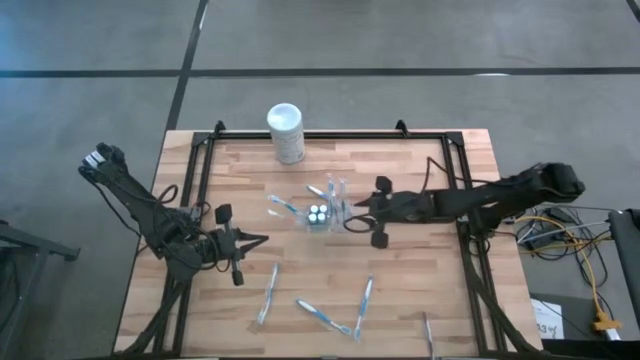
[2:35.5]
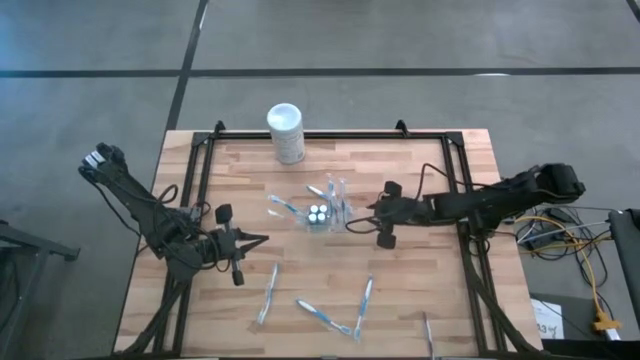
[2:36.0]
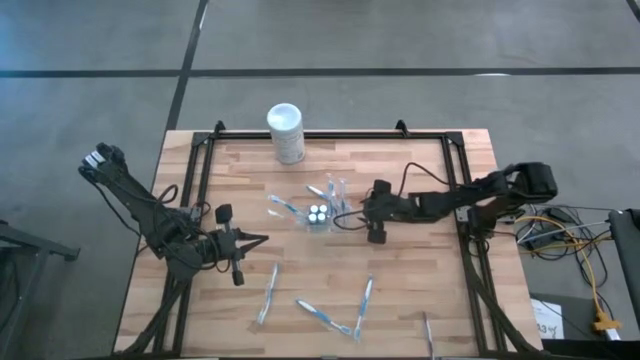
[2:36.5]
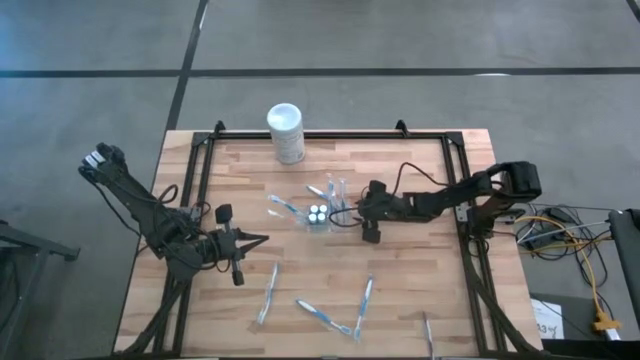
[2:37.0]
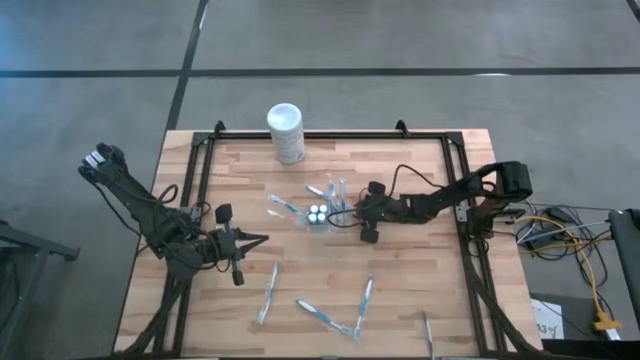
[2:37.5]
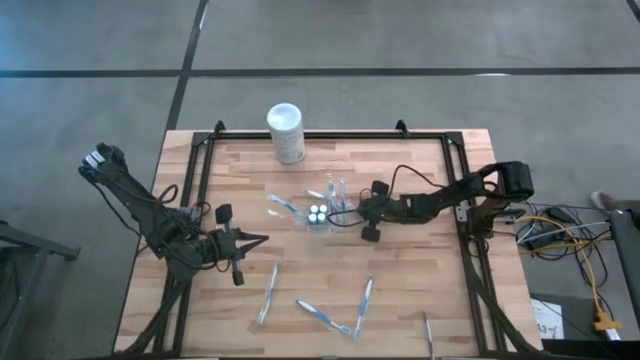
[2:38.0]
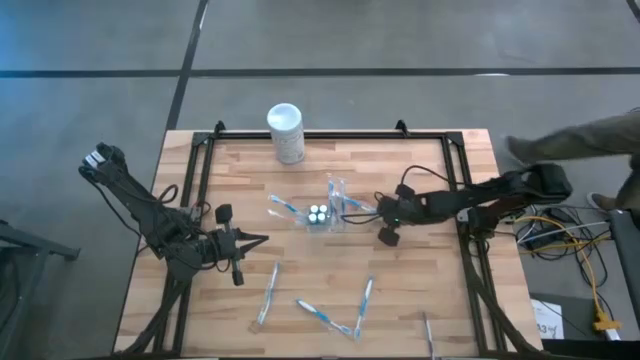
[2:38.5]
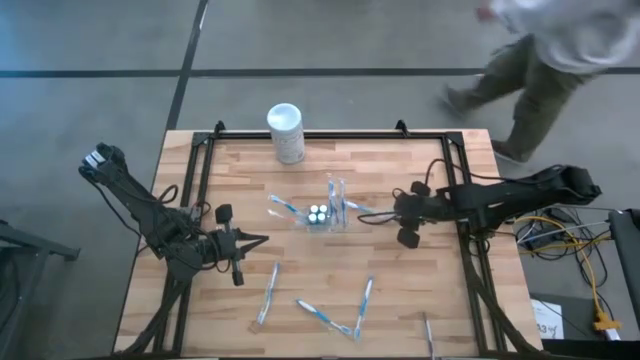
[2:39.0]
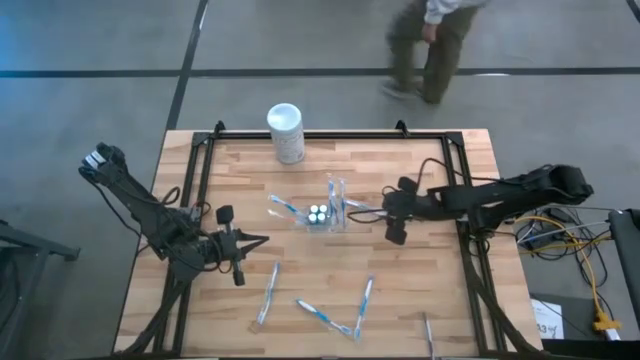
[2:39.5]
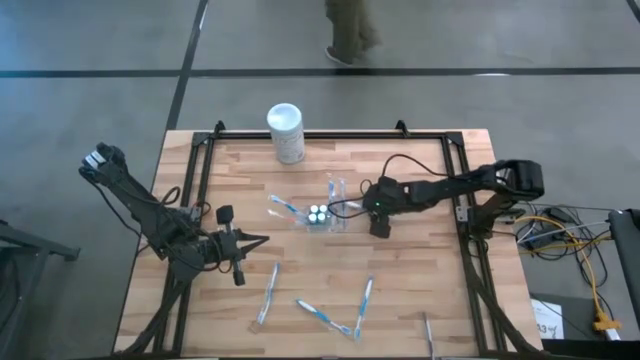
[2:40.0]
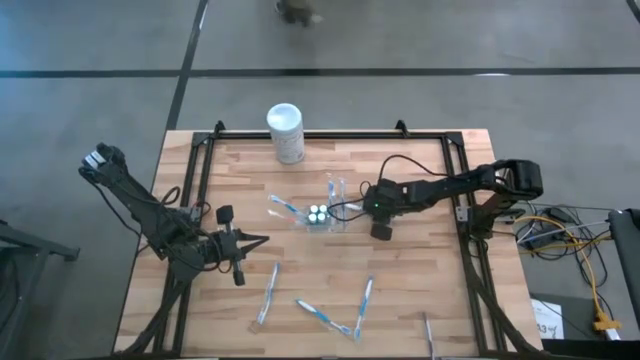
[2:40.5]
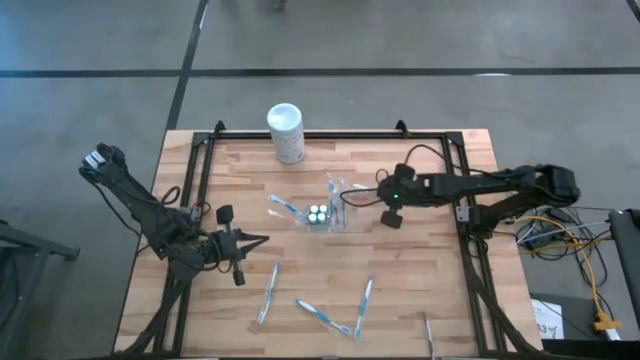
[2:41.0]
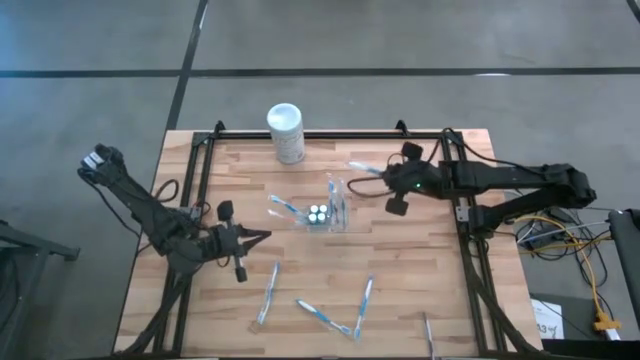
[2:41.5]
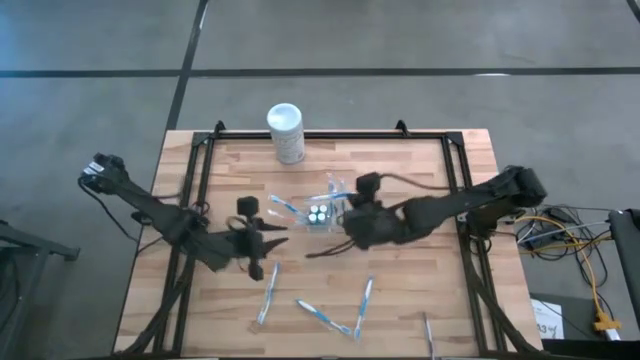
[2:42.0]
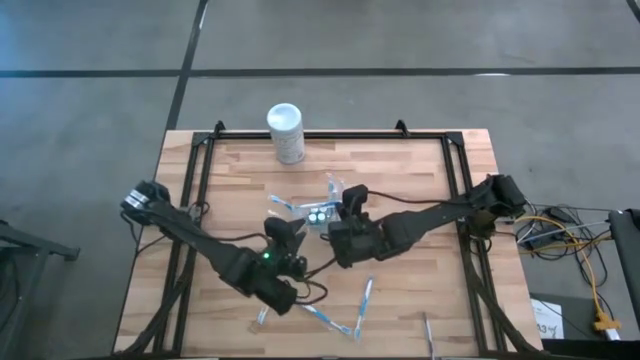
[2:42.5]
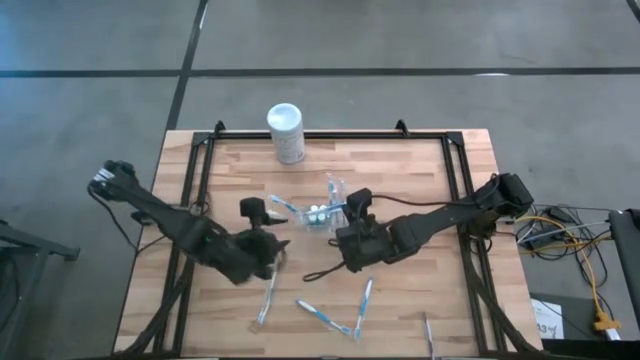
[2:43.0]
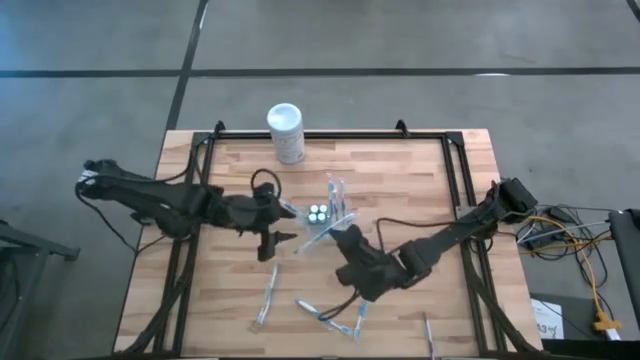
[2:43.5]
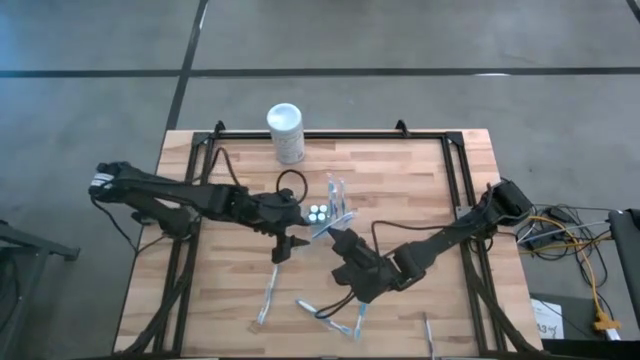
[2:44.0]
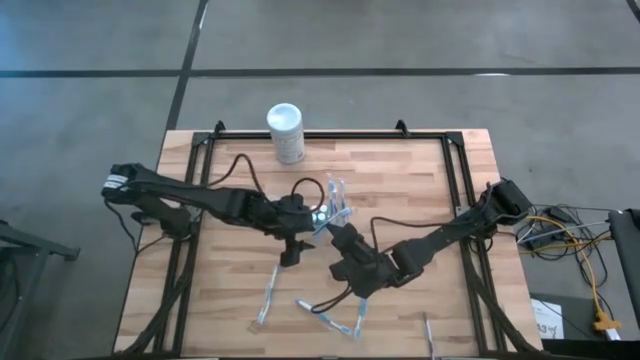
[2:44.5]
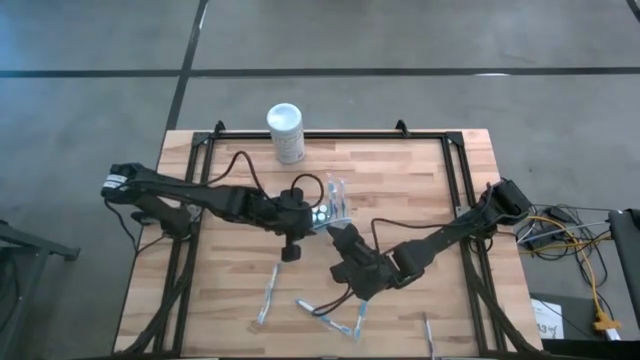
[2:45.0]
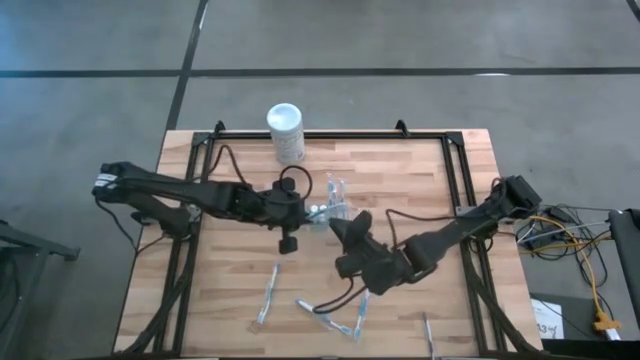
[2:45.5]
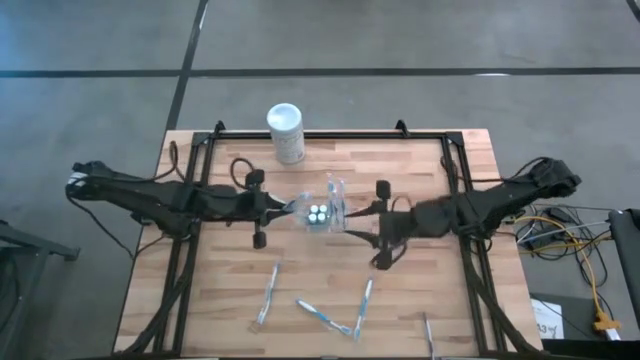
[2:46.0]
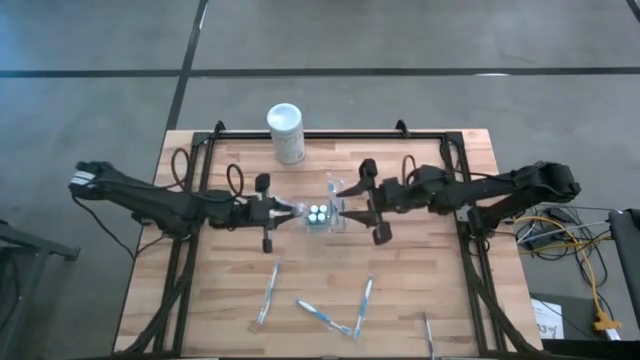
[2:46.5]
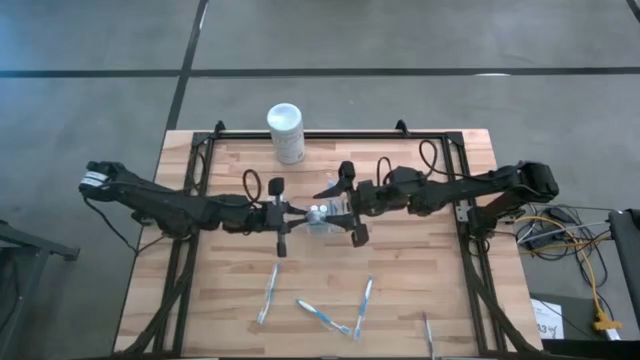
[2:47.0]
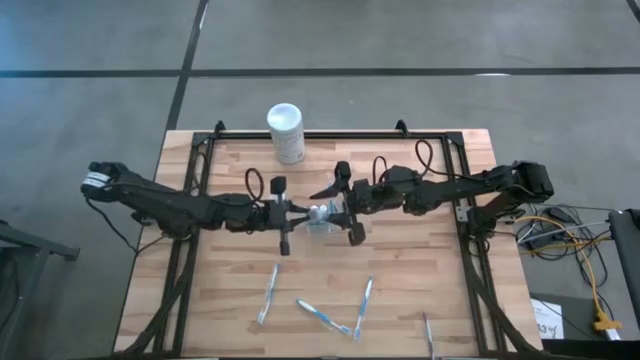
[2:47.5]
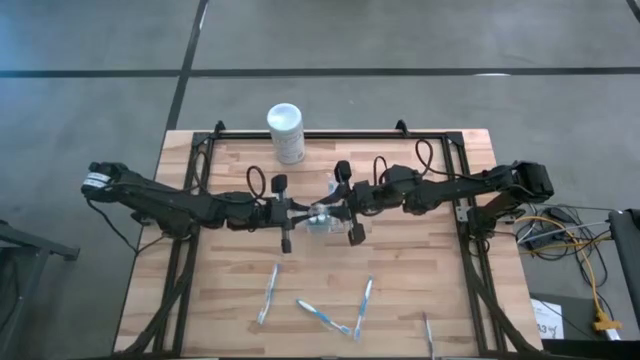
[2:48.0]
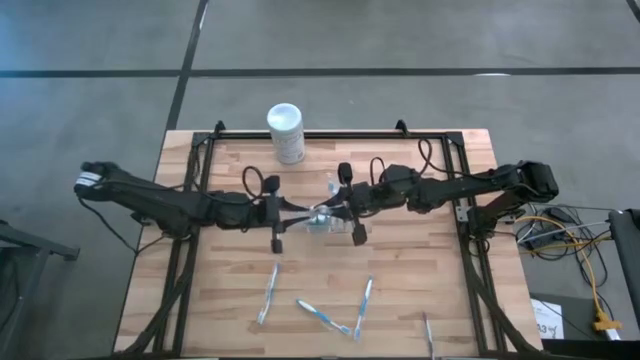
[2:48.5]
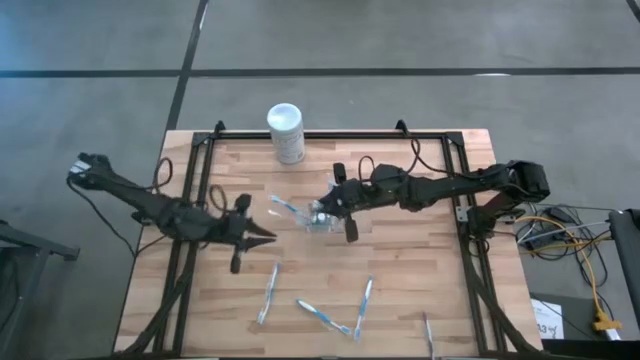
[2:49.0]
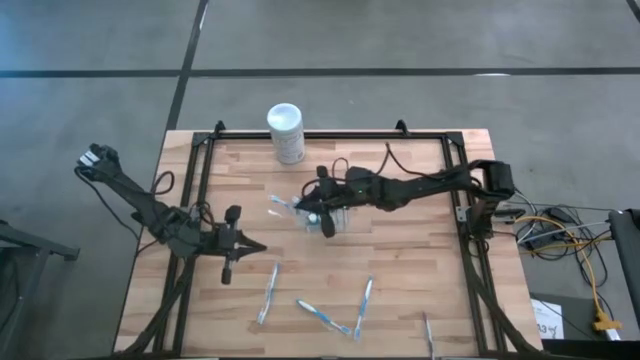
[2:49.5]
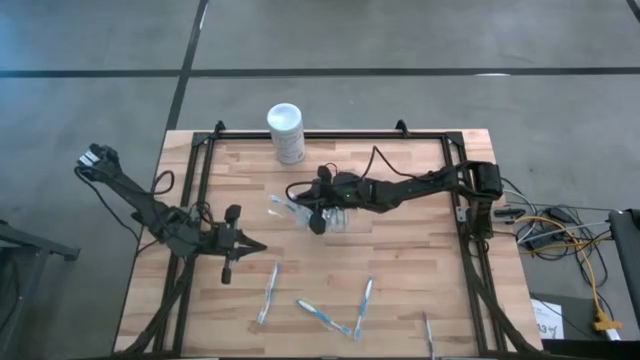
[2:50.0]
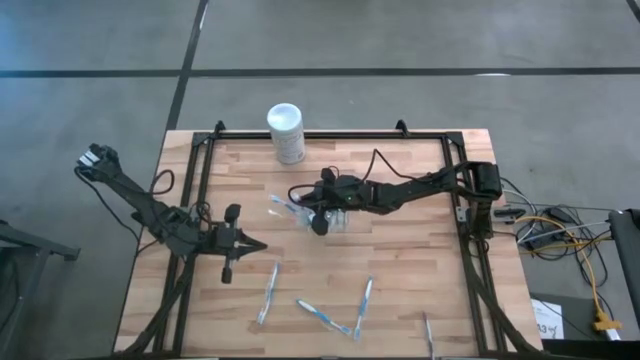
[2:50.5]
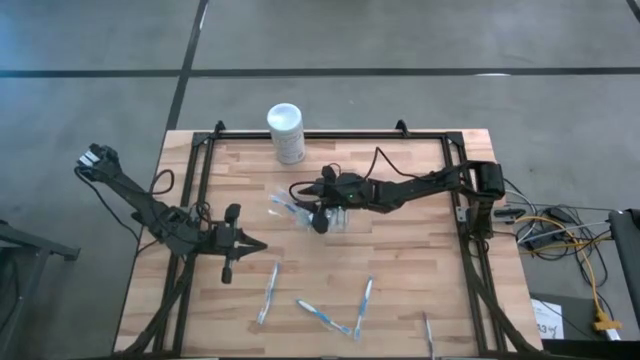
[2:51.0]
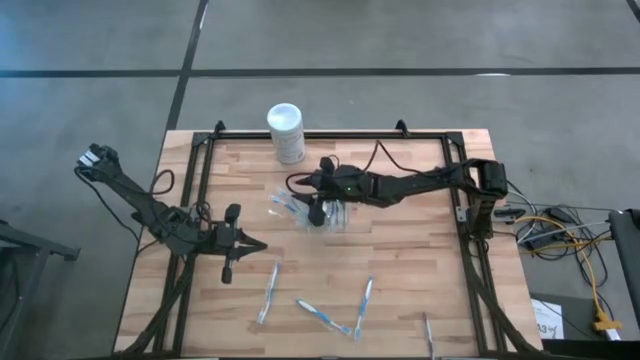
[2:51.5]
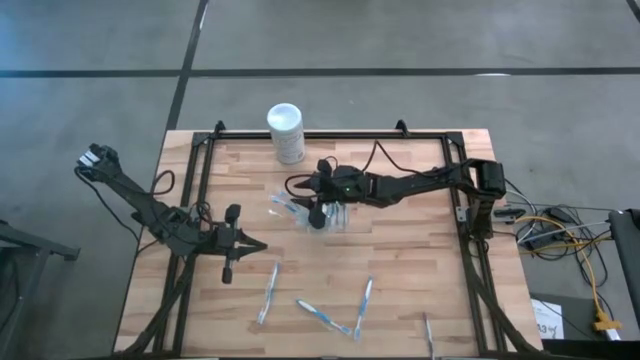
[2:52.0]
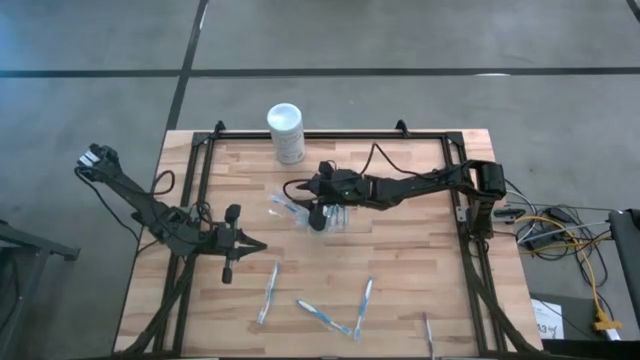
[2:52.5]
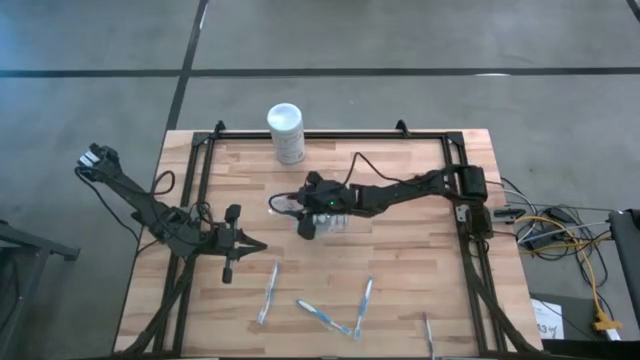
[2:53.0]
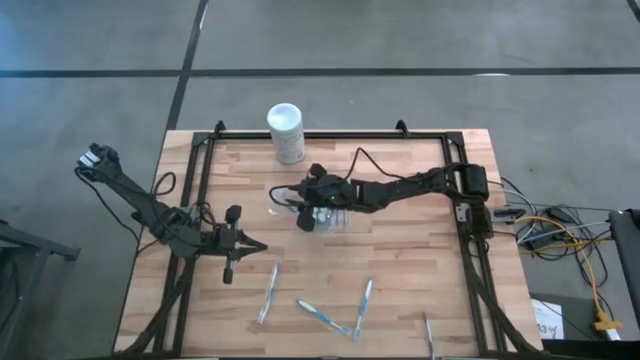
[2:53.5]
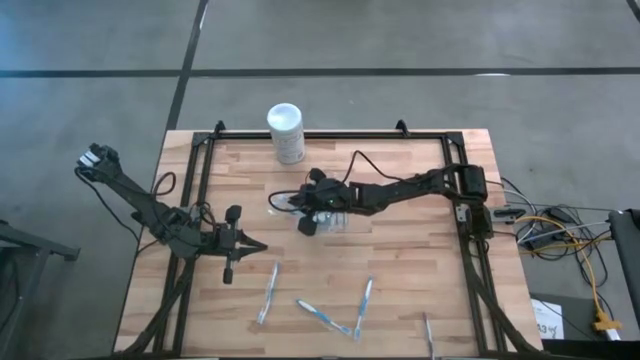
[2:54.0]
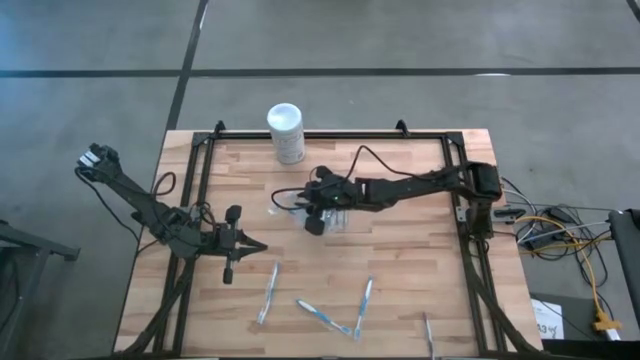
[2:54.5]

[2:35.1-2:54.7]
Task: Pick & Place toothbrushing station
Put the blue toothbrush into the transparent organizer

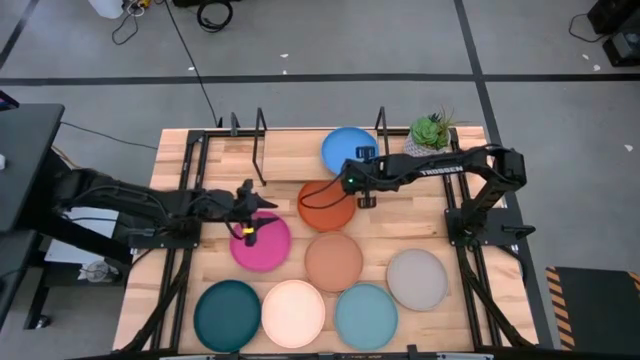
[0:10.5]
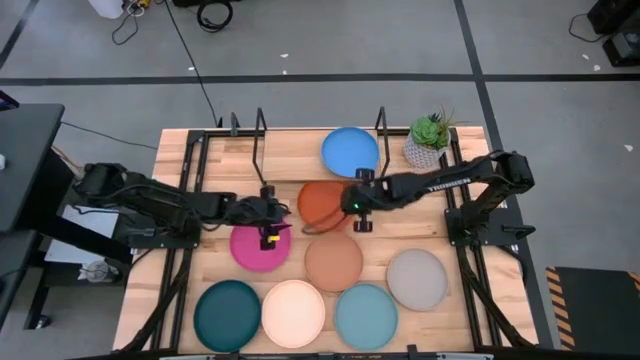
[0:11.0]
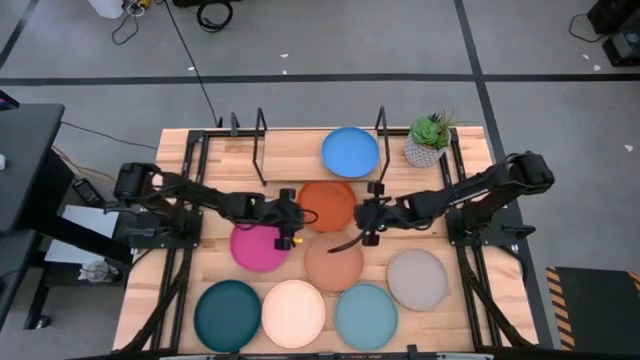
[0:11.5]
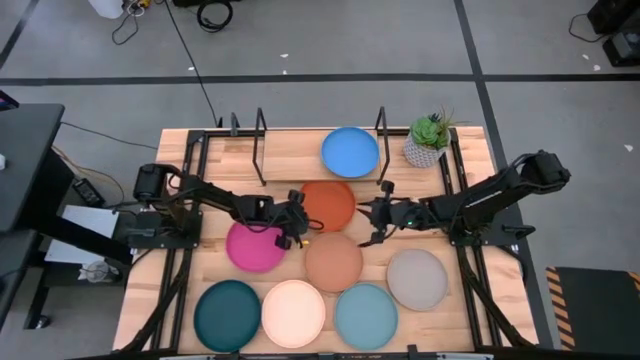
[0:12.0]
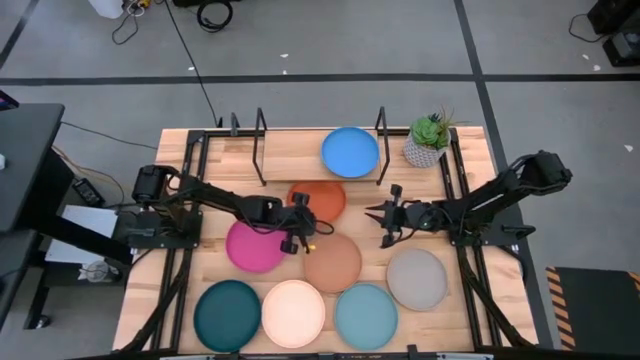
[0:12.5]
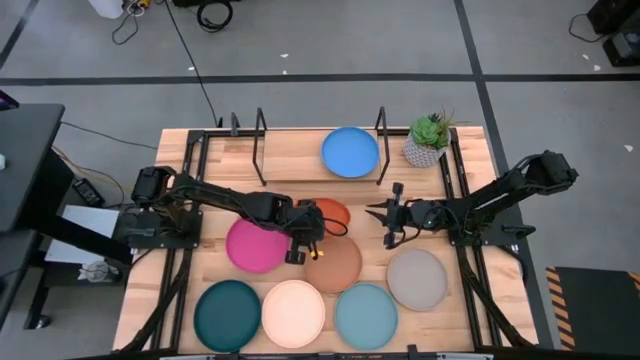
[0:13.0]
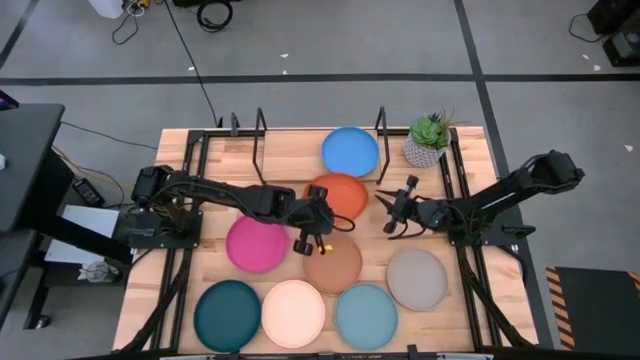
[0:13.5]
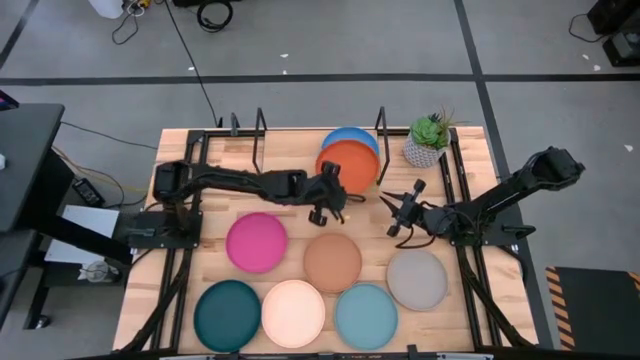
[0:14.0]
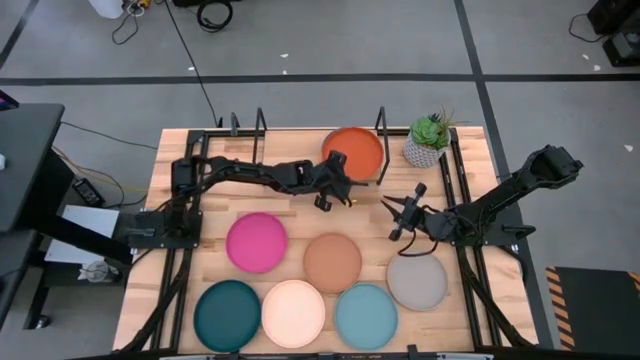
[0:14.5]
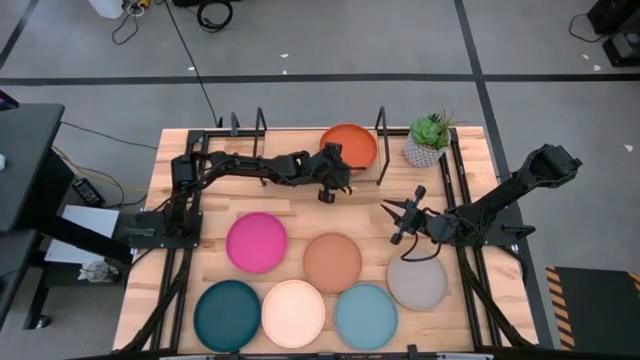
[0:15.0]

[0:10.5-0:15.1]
Task: Place and stack plates onto a shelf
Stack the orange plate on top of the blue plate on the shelf
